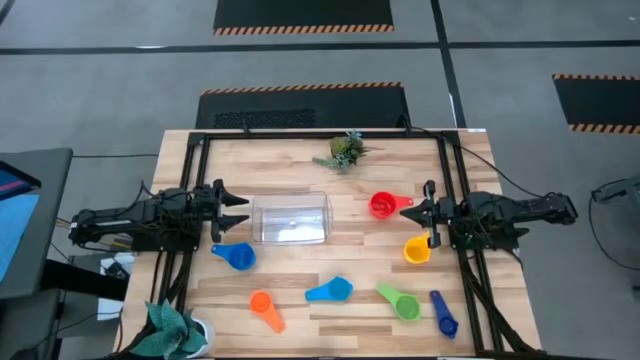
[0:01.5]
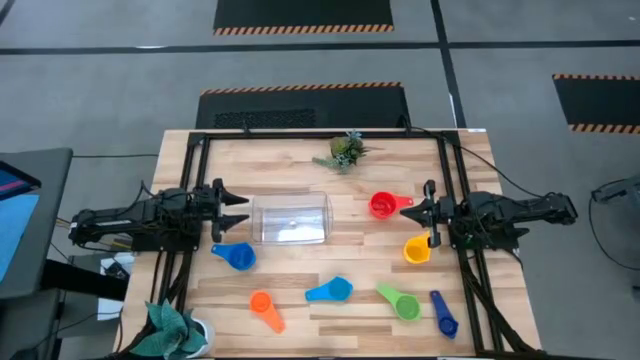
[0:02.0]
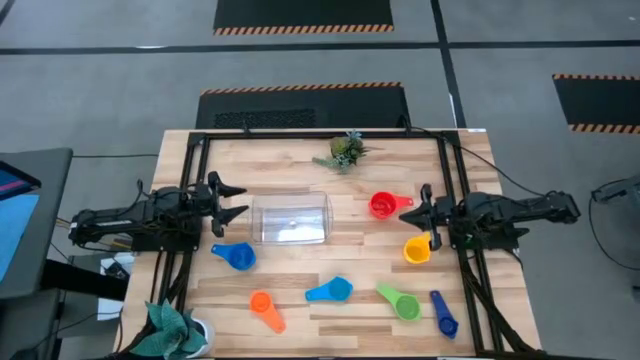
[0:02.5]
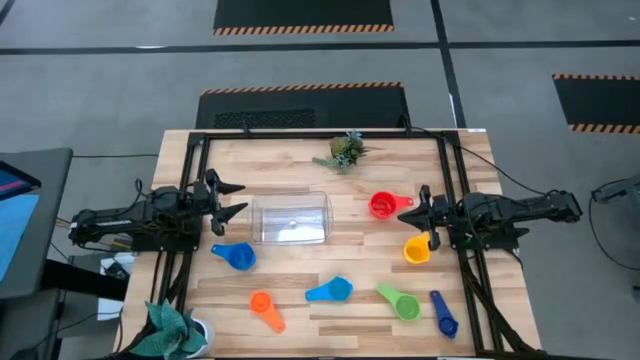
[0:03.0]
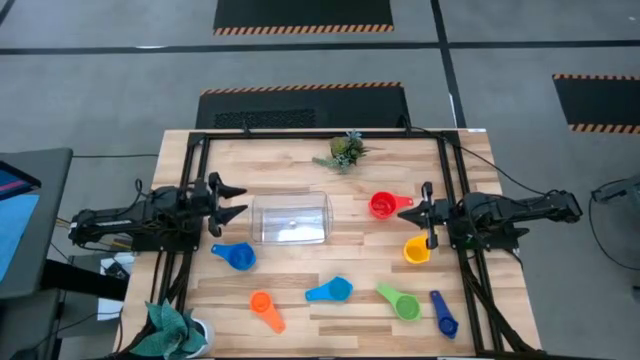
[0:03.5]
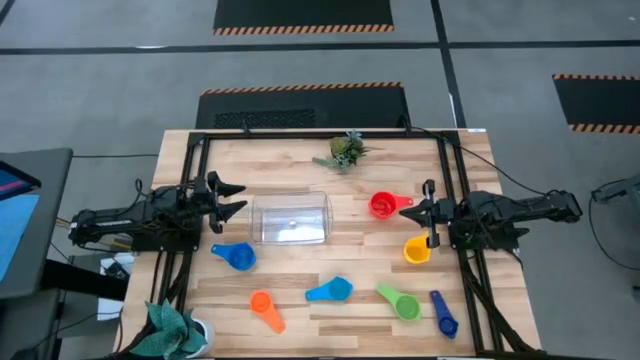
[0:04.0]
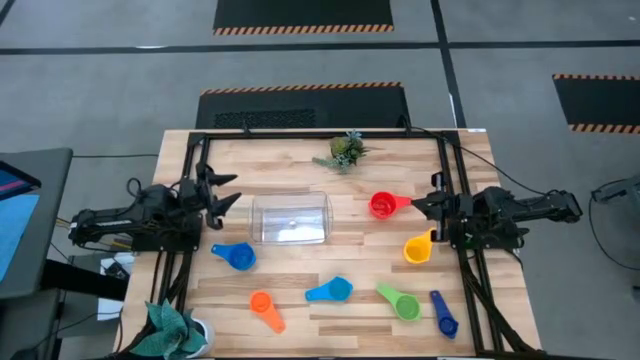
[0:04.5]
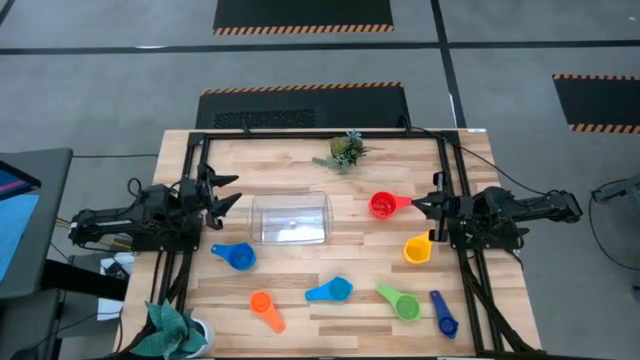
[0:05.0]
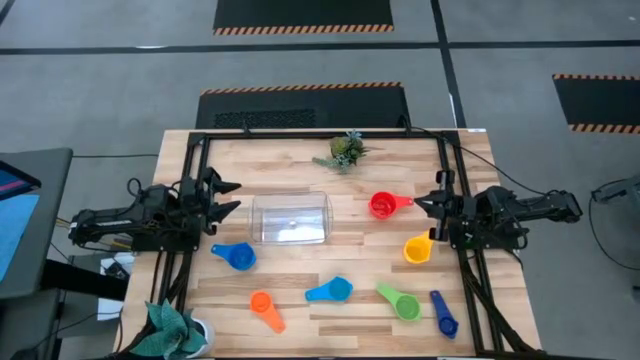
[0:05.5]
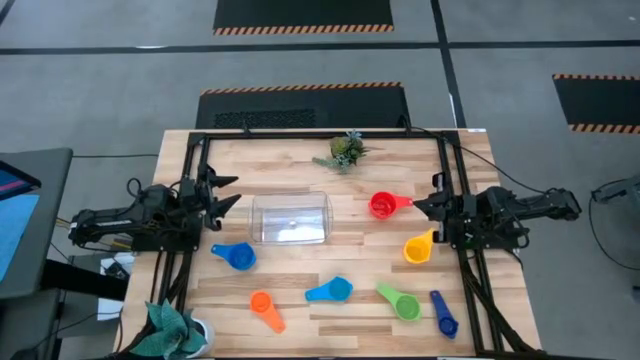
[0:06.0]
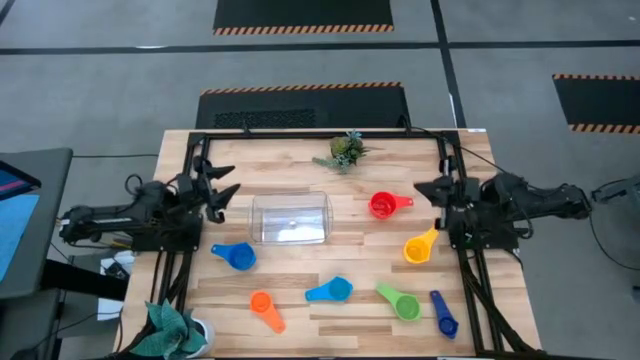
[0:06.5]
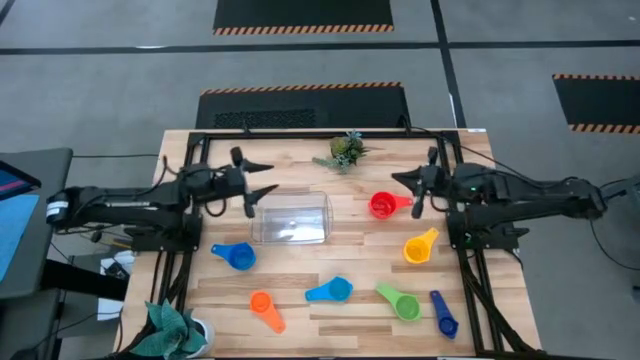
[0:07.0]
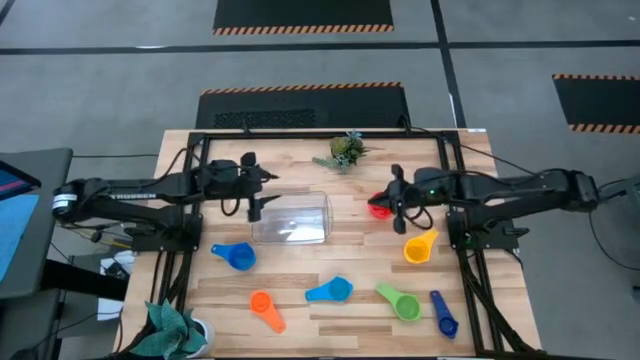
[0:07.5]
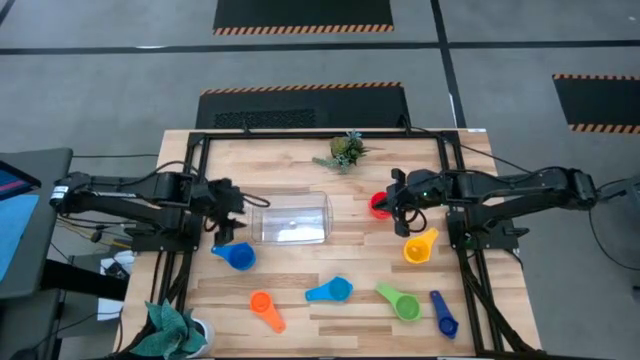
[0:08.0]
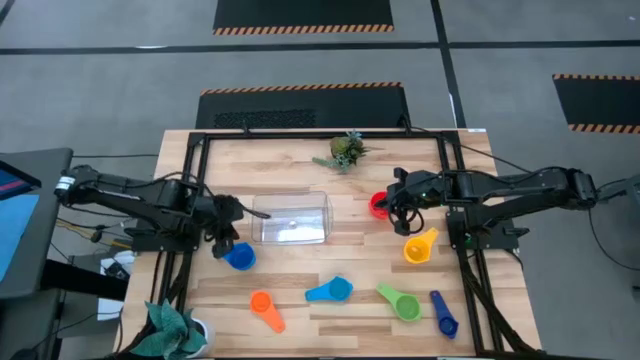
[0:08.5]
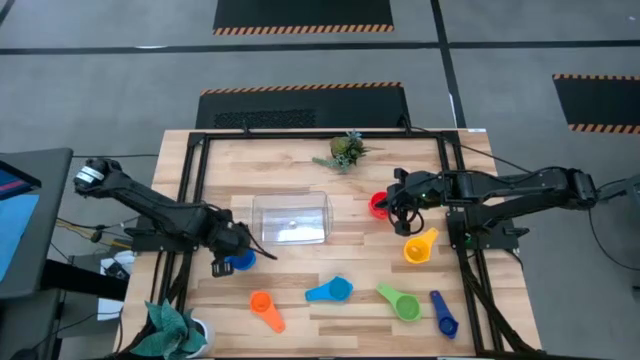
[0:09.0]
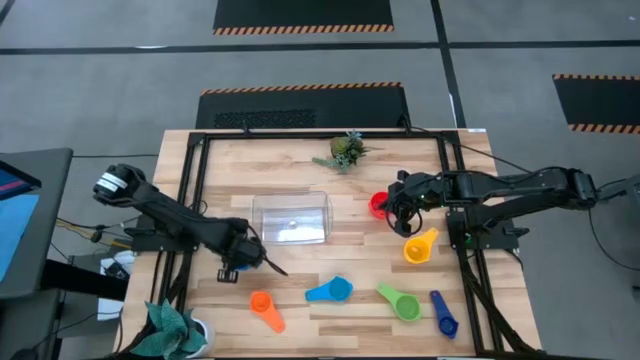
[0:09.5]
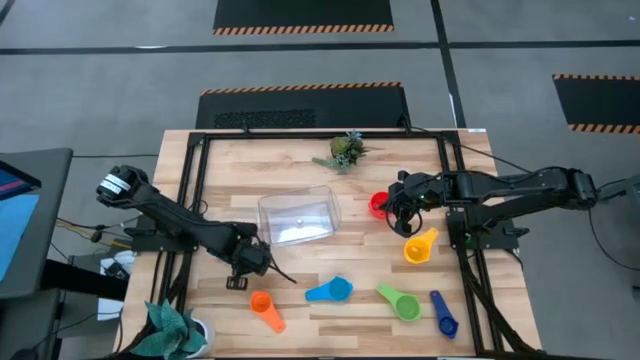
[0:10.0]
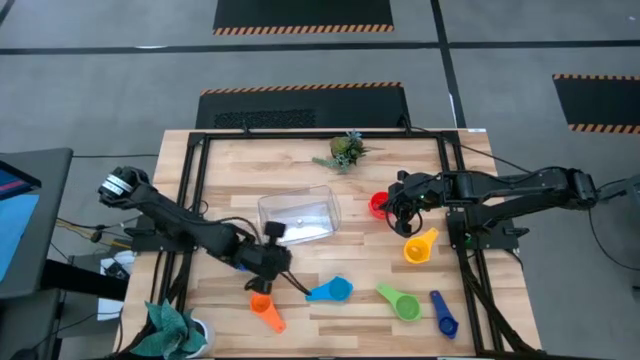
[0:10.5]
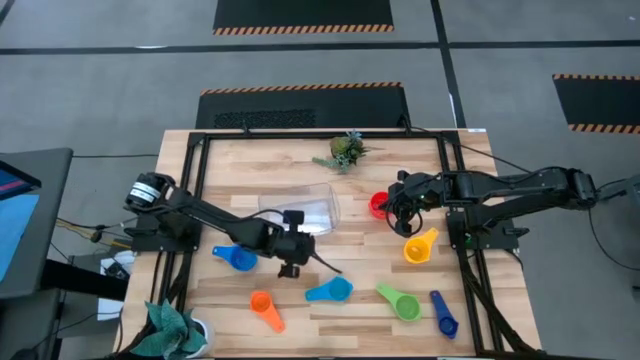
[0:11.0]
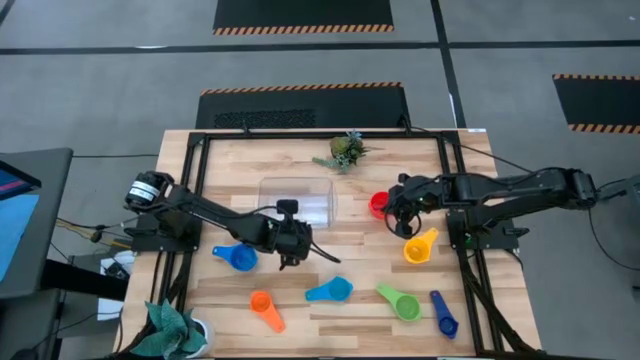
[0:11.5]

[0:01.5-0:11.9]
Task: Nest measuring cups in basket
Adjust the transparent bin

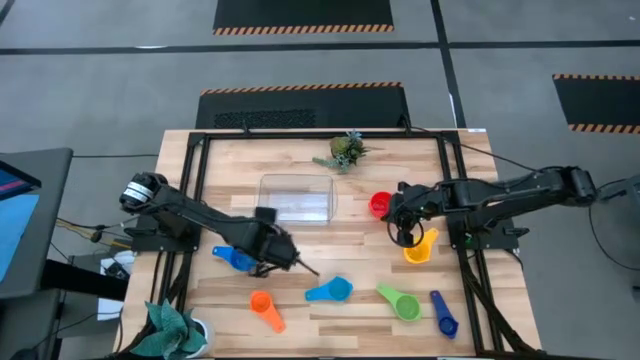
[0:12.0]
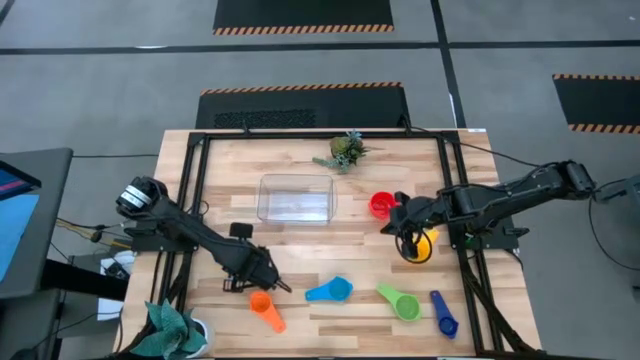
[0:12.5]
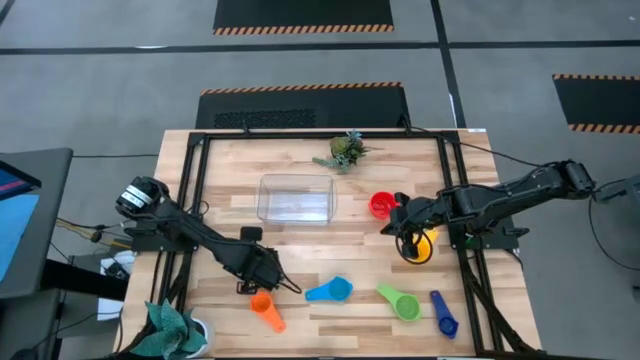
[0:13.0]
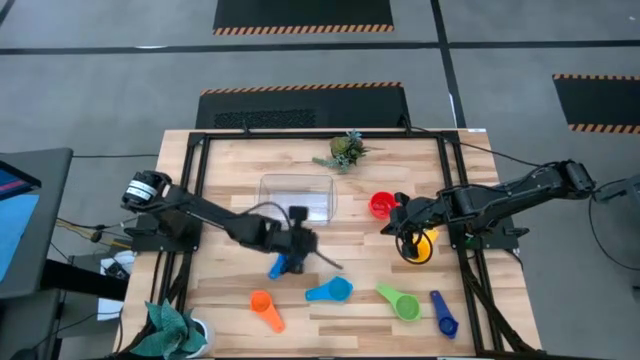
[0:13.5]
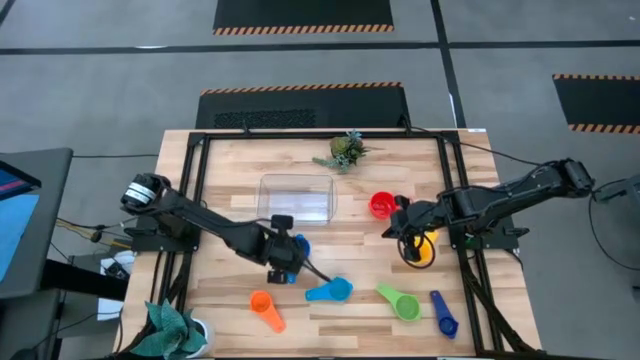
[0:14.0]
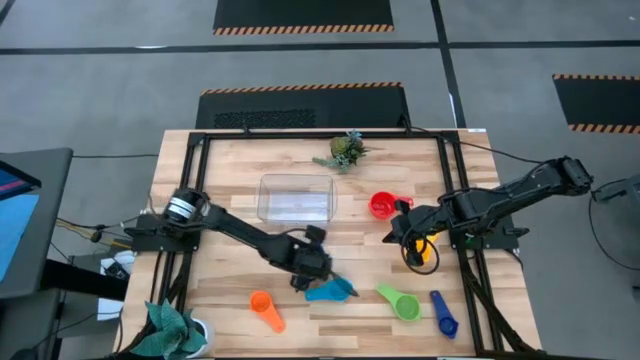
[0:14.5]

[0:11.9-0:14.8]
Adjust the blue measuring cup

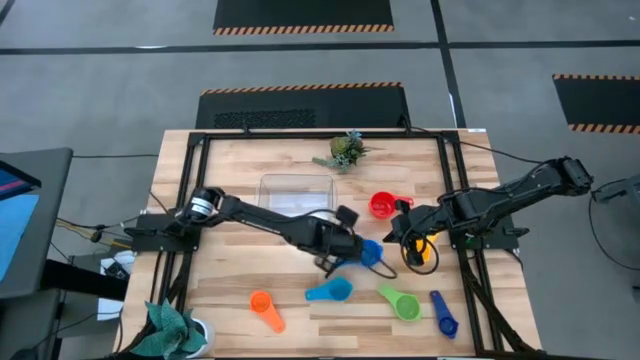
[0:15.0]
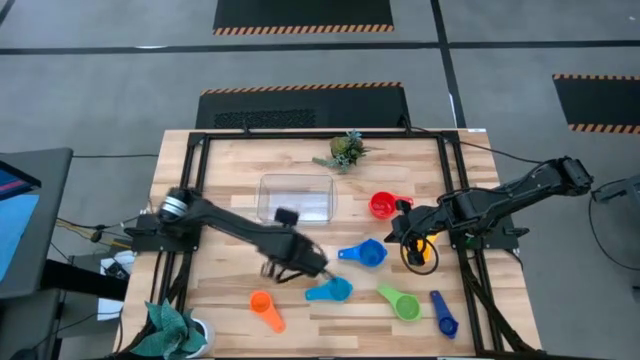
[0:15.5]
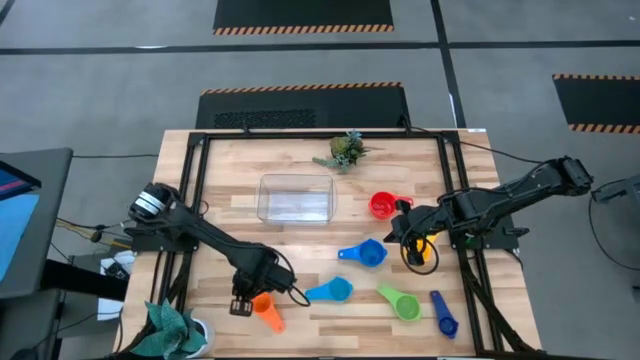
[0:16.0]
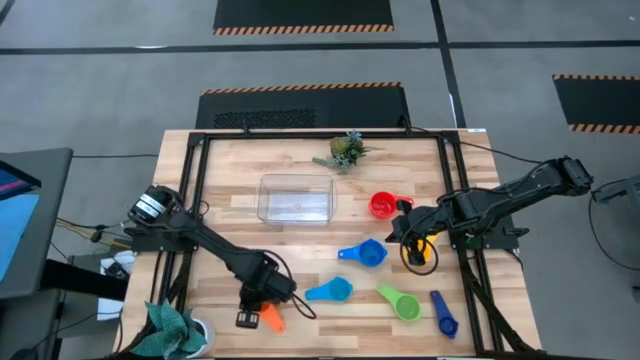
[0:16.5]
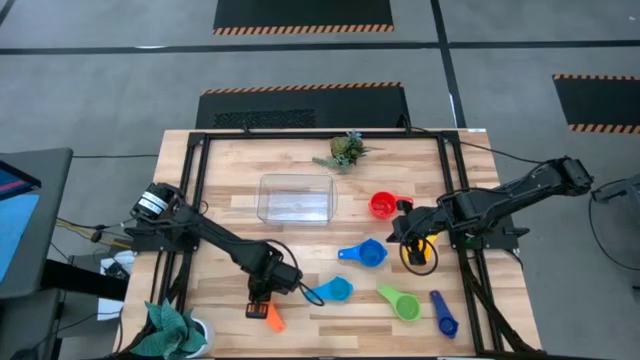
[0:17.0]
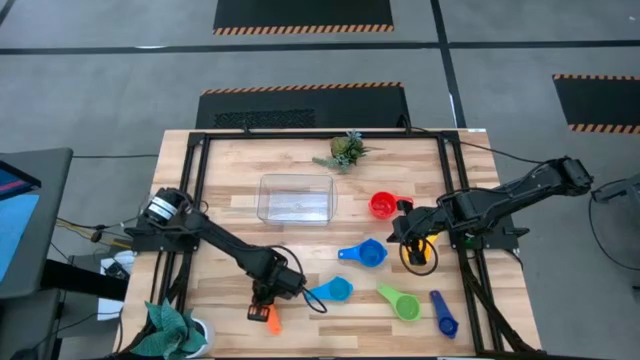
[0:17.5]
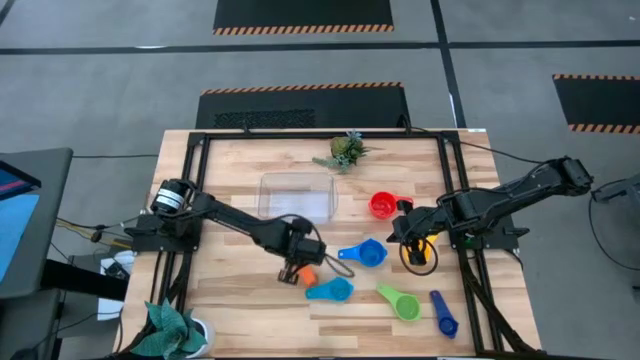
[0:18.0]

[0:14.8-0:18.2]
Adjust the orange measuring cup

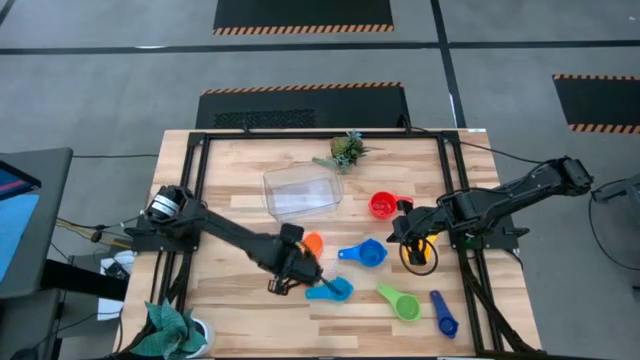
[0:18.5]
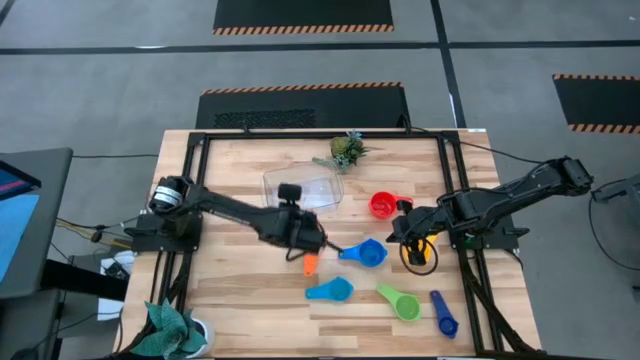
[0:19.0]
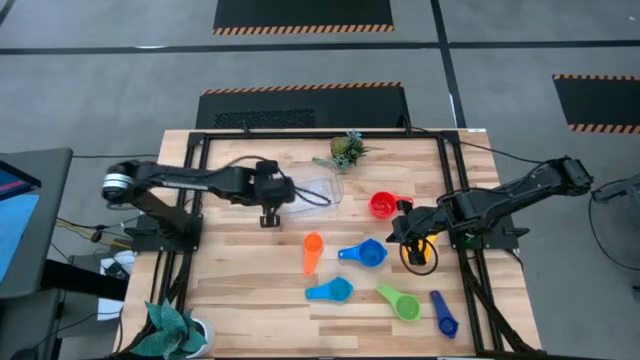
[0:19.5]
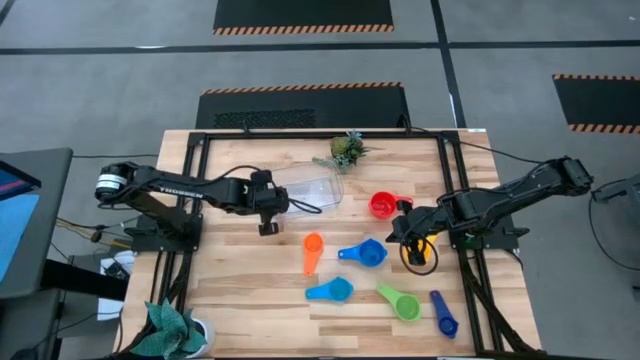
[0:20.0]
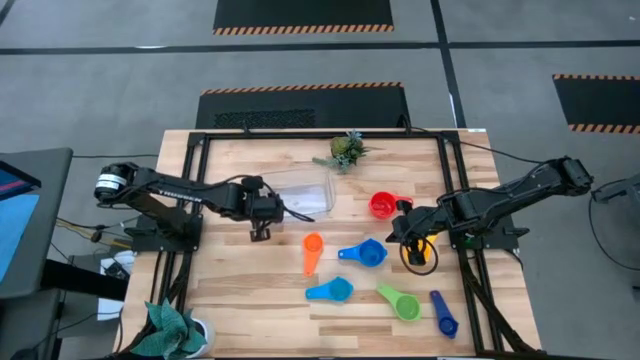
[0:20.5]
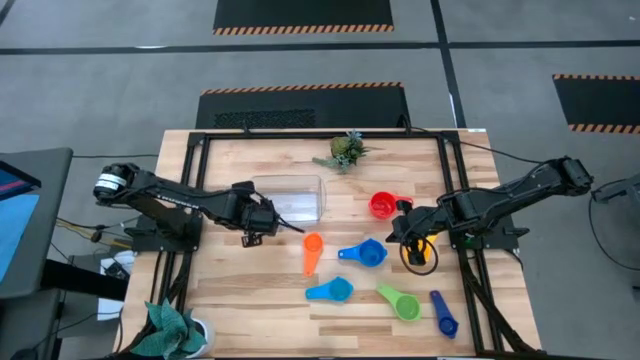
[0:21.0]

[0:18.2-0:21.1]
Adjust the transparent bin

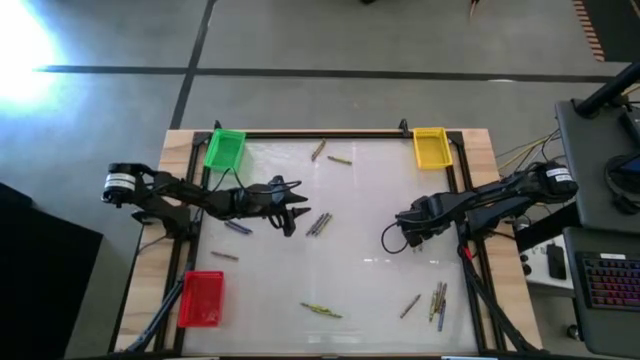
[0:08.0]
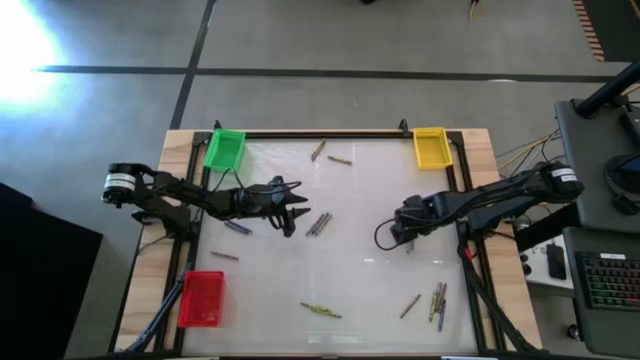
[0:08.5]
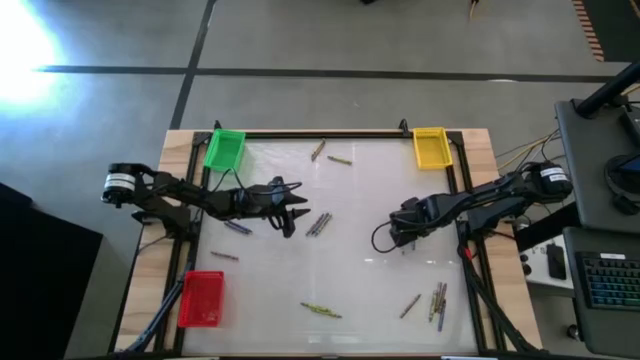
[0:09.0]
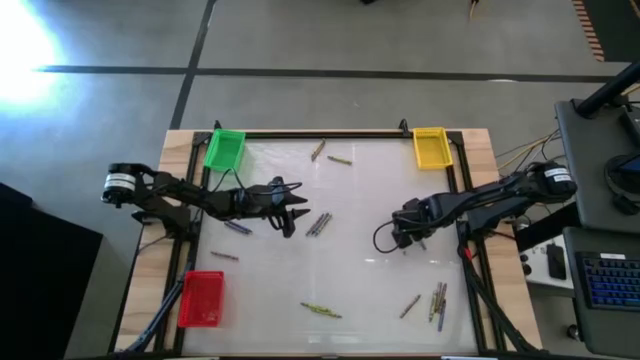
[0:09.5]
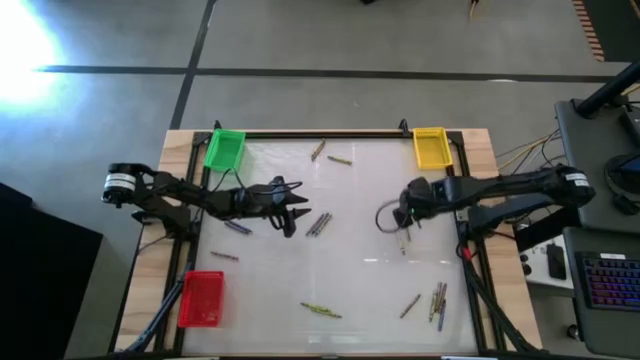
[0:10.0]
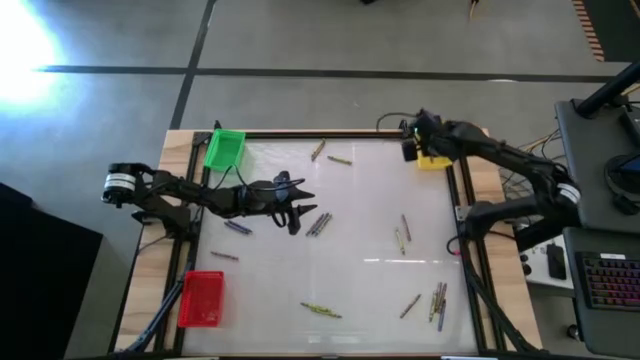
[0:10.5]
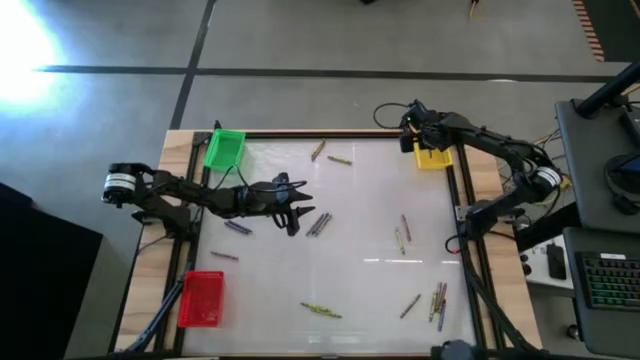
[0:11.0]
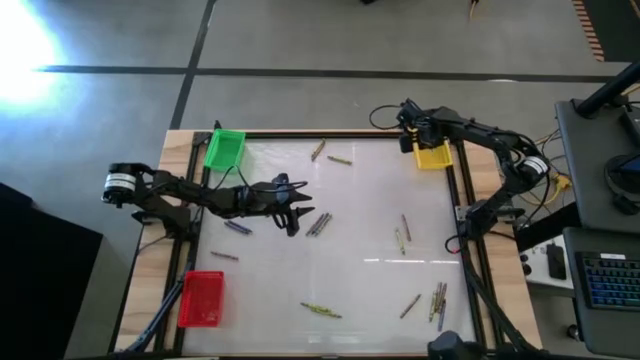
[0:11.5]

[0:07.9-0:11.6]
Task: Sort crayons
Put the blue crayon into the yellow basket
